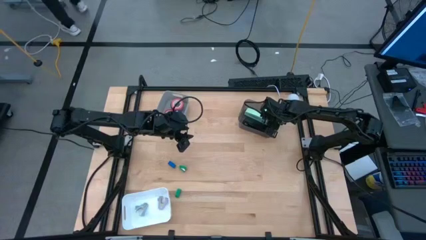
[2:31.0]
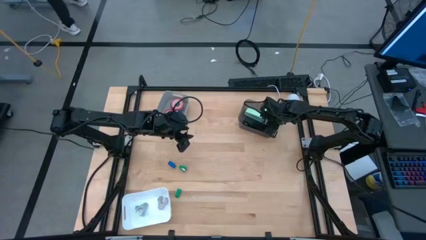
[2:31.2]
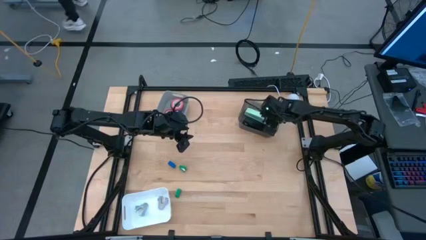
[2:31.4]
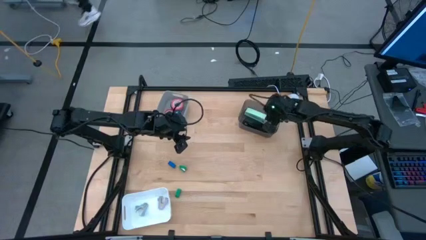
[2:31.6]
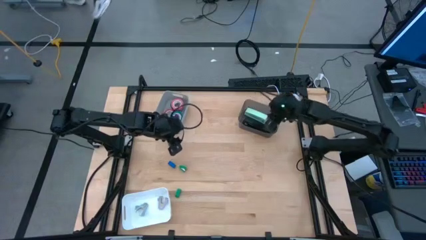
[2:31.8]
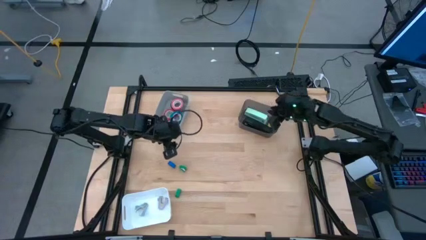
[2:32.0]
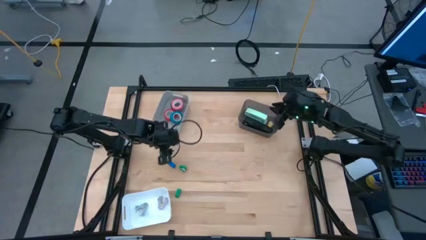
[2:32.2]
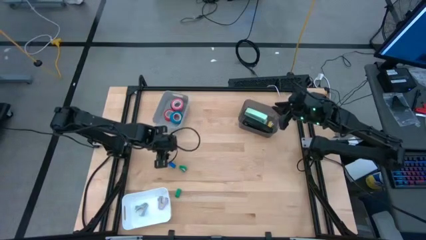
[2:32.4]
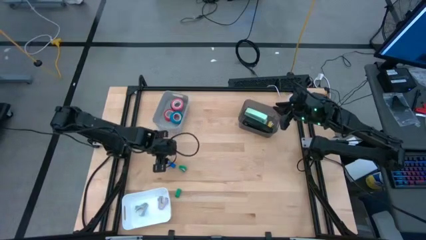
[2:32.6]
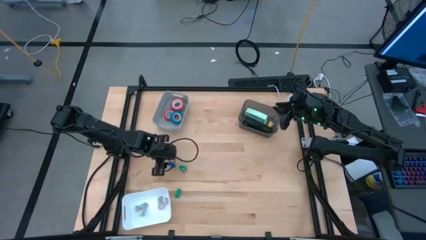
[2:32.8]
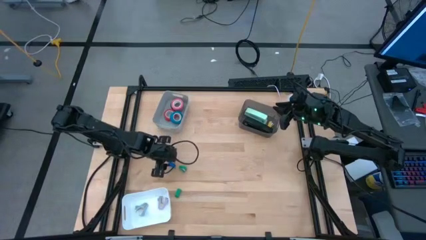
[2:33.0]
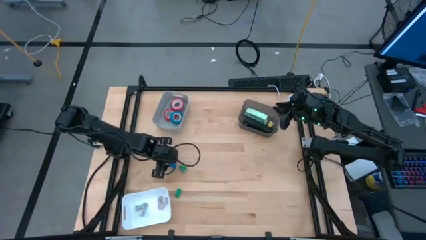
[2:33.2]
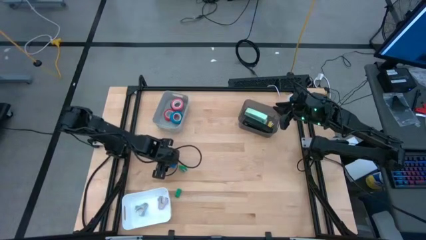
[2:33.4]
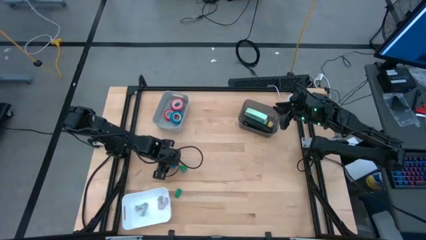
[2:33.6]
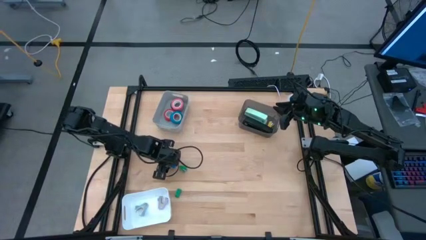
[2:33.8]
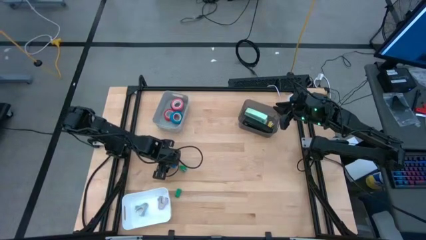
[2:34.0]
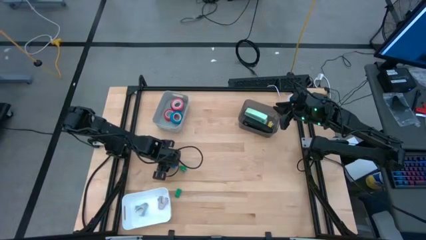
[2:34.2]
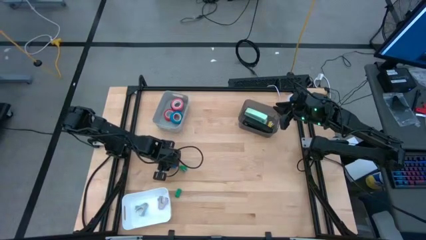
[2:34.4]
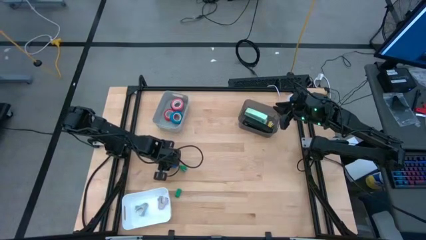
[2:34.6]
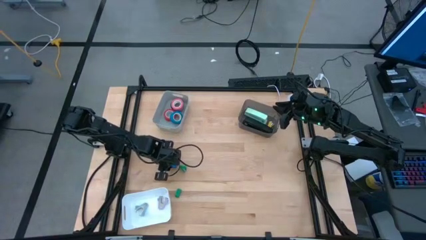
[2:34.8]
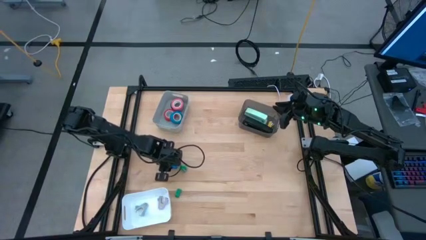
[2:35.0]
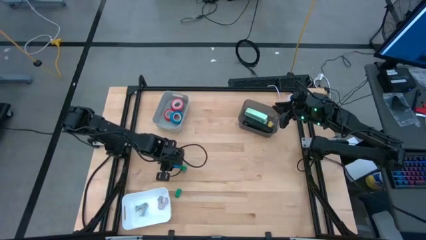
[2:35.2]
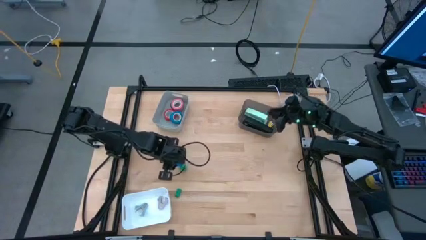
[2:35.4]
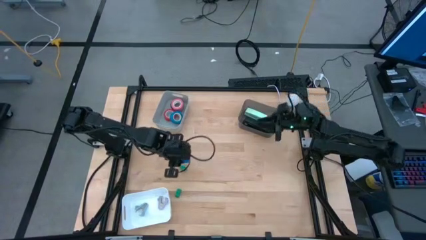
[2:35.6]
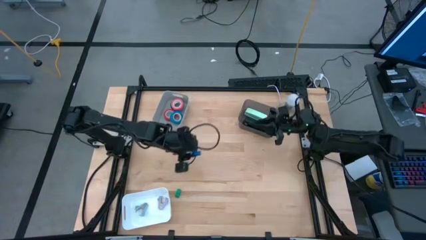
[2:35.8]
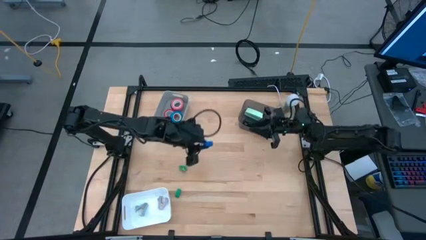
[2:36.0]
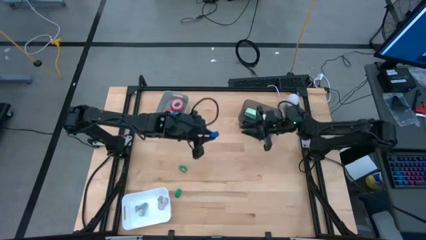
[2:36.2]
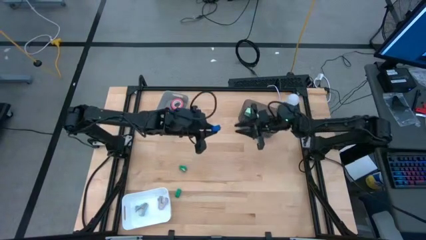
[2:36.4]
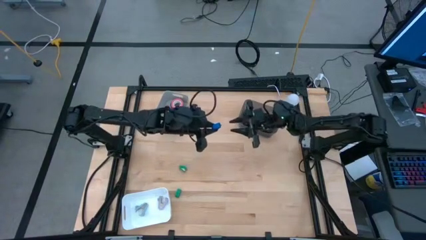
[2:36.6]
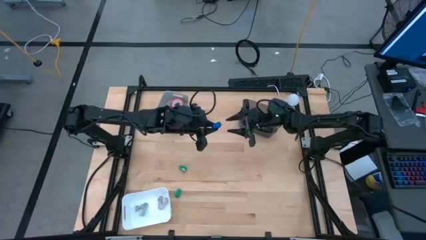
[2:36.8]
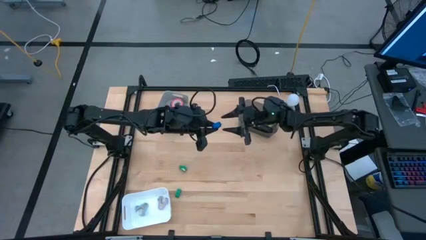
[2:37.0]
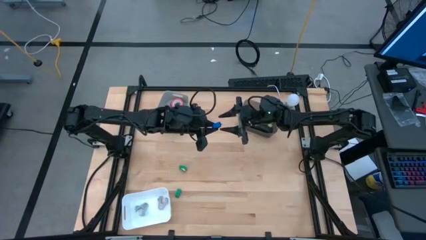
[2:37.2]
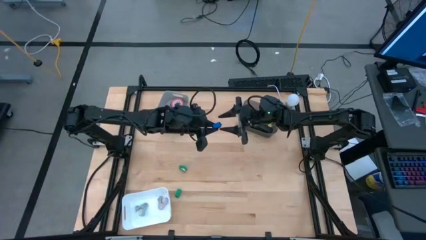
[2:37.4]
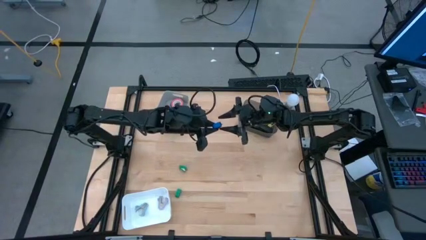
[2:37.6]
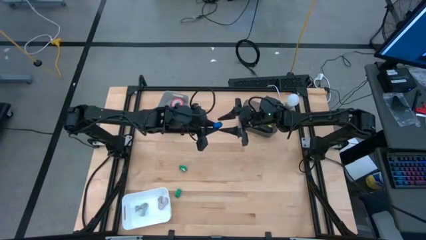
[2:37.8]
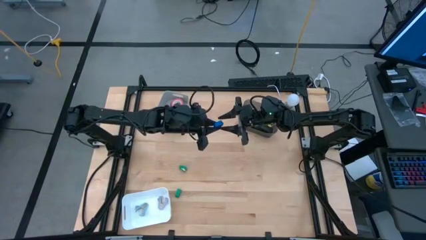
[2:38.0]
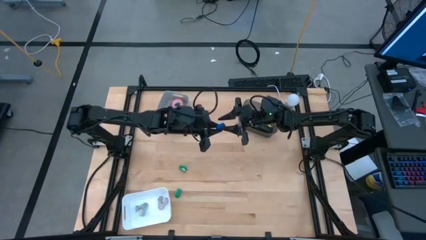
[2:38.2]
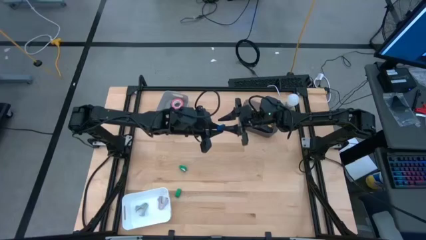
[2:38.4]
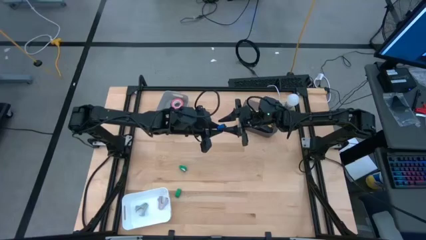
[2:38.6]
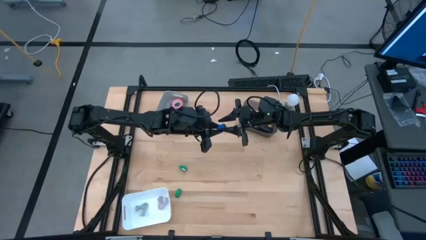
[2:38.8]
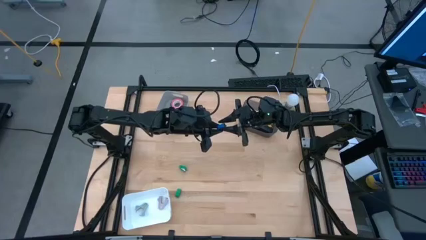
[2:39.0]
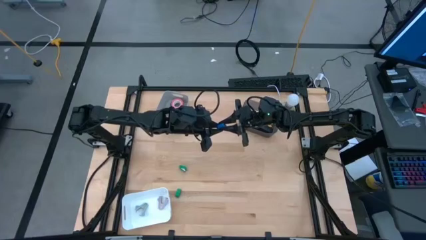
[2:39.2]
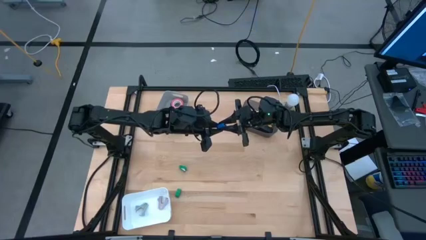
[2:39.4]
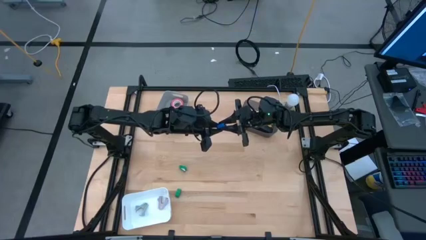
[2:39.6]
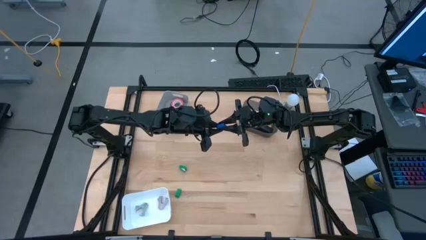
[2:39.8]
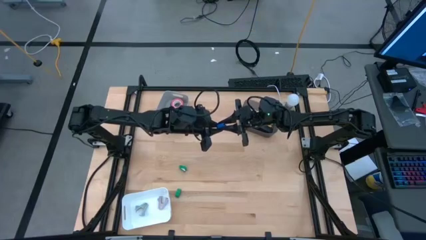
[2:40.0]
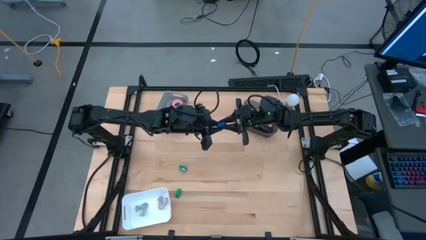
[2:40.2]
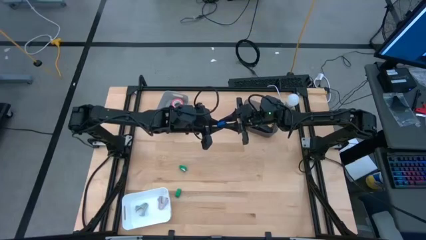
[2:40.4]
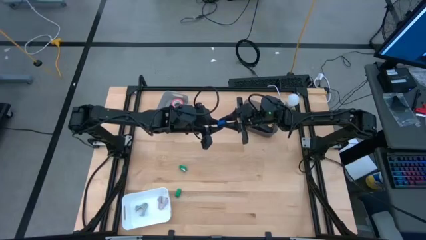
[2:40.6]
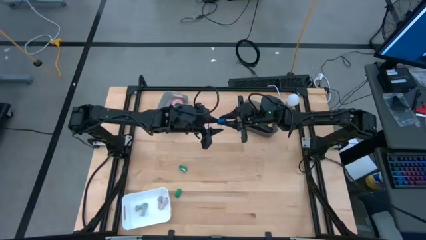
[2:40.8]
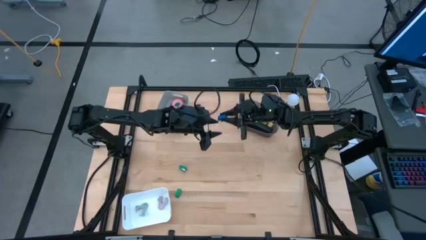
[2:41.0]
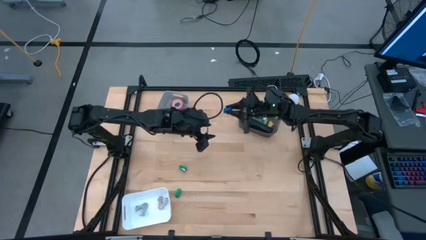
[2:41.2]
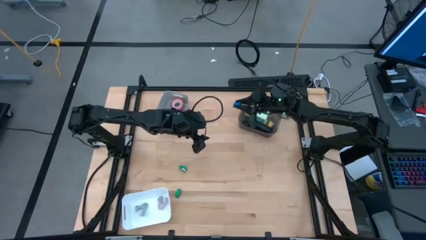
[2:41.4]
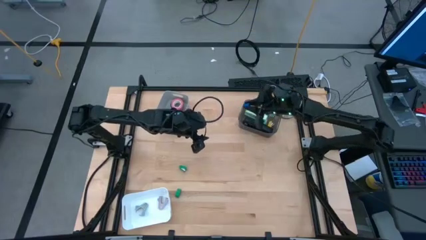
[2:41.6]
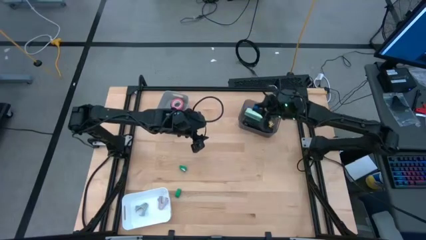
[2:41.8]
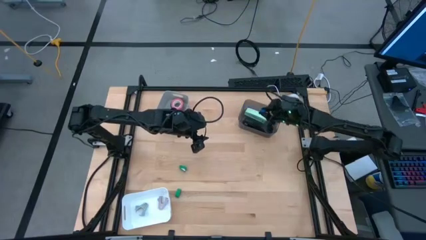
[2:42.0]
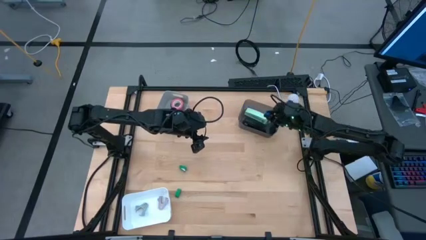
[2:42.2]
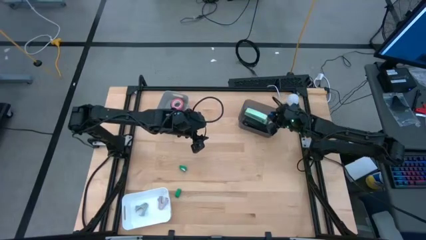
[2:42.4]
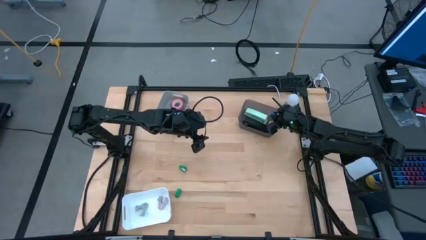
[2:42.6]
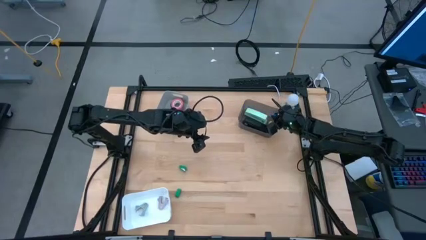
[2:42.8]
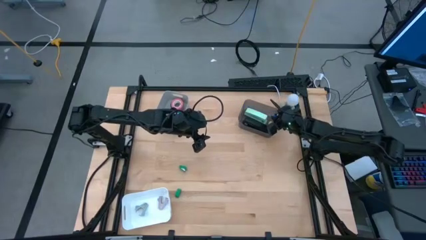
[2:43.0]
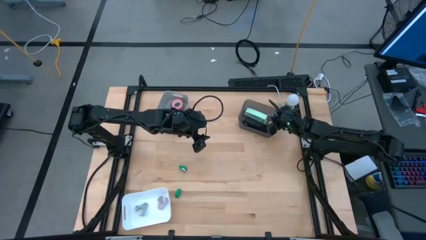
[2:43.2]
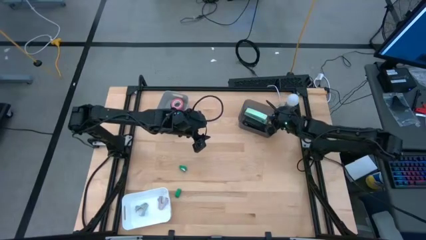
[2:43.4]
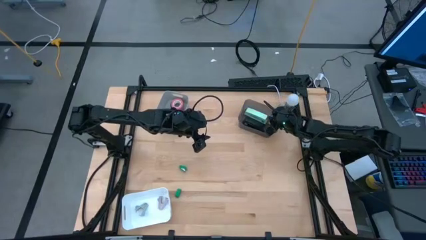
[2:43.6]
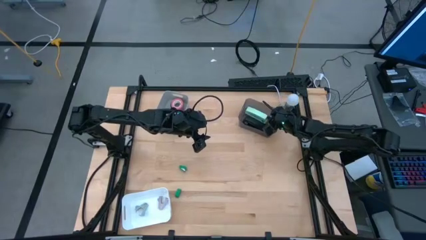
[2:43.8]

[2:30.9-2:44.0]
Task: Pick and place Stapler, Stapler remover, tape
Put the blue stapler into the black bin

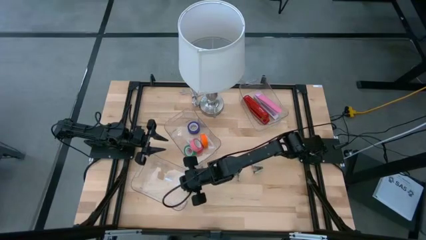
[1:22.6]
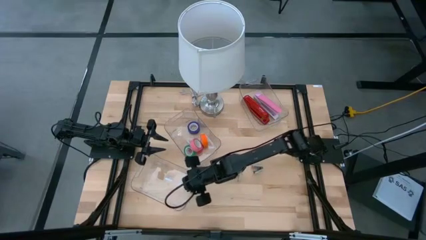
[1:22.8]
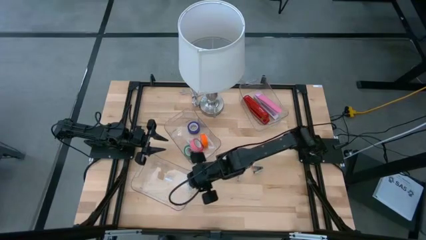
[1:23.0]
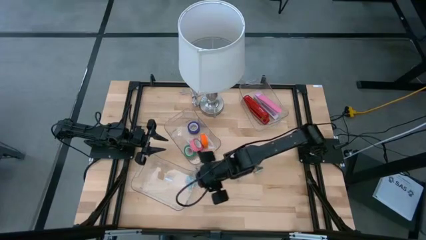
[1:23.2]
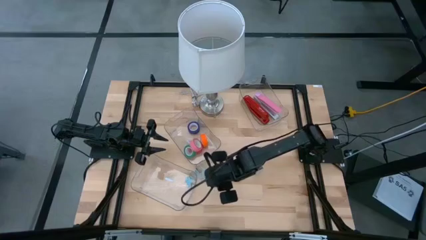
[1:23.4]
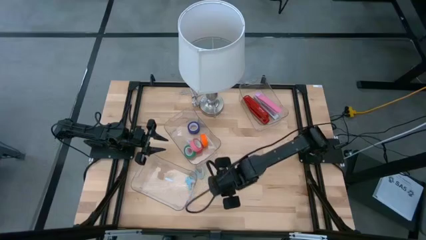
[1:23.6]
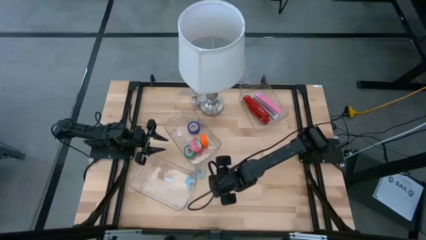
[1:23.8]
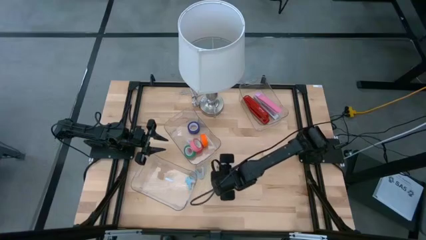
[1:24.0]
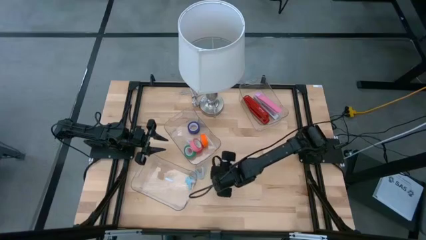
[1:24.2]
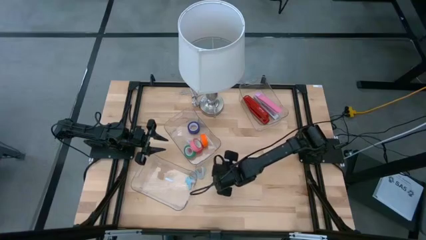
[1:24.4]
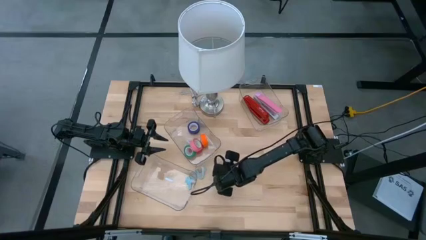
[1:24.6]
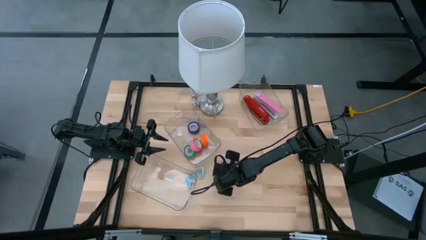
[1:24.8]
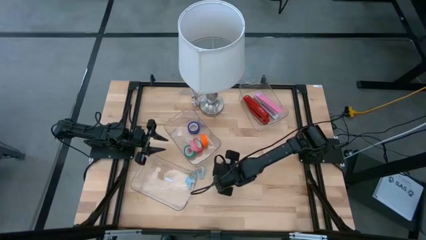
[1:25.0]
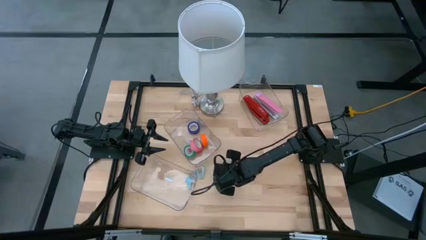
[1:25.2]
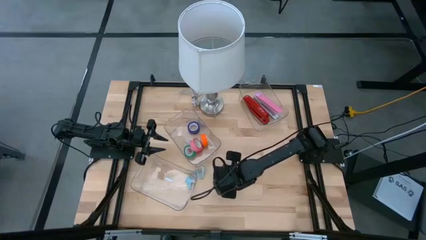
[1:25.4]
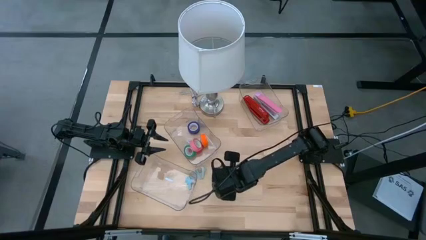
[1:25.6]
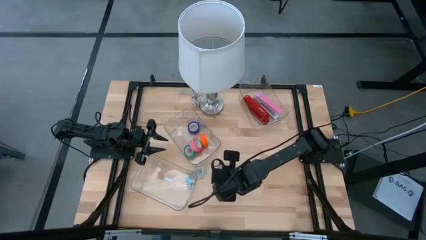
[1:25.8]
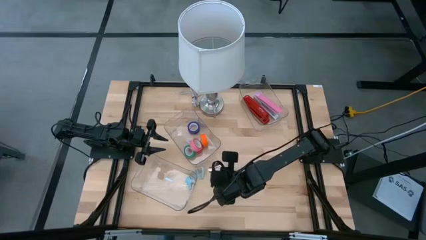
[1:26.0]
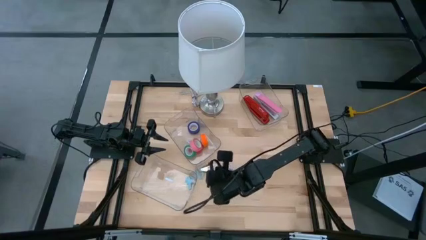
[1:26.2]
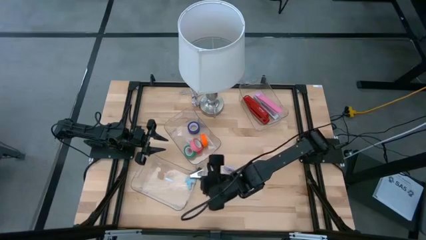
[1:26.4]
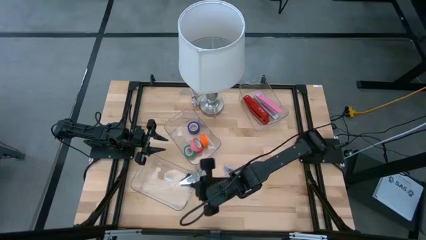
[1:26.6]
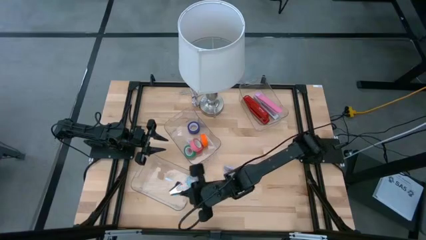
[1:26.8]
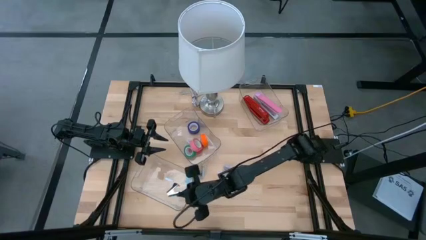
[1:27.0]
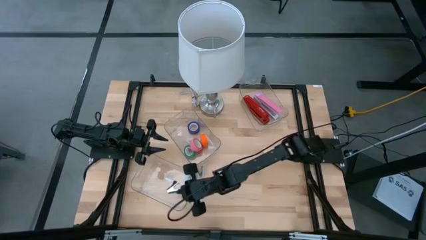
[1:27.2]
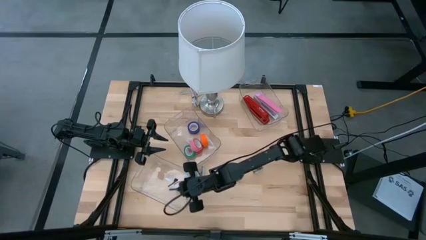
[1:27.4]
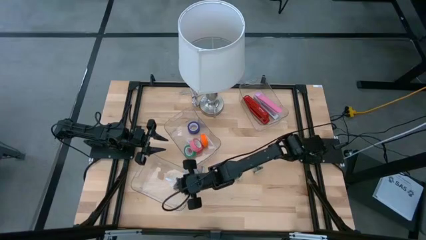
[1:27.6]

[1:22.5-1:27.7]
Task: Pick and place Stapler, Stapler remover, tape
Put the black staple remover into the bottom transparent bin
